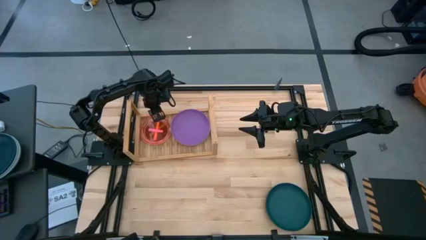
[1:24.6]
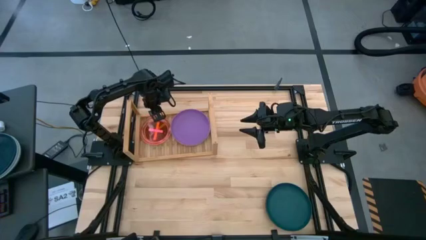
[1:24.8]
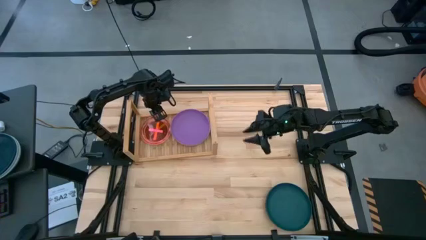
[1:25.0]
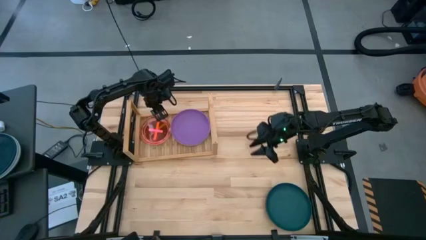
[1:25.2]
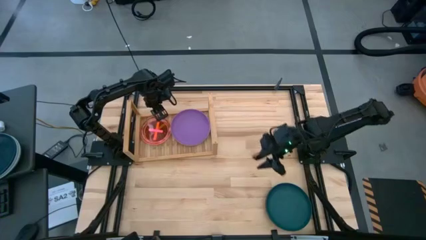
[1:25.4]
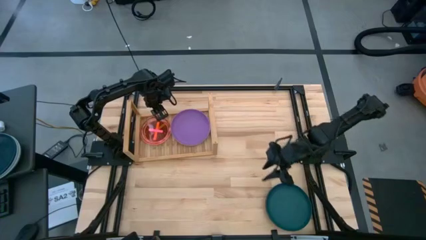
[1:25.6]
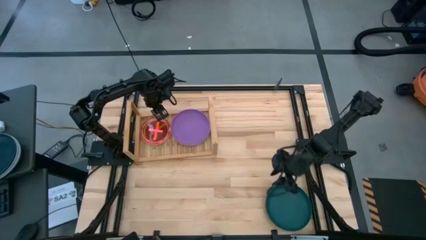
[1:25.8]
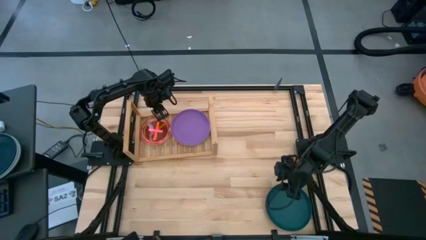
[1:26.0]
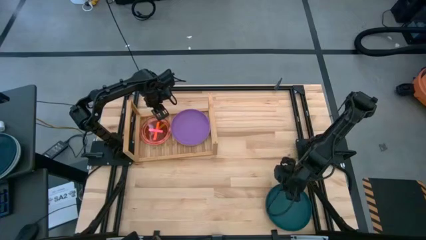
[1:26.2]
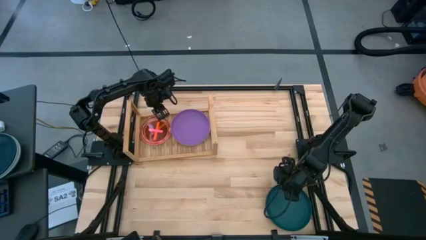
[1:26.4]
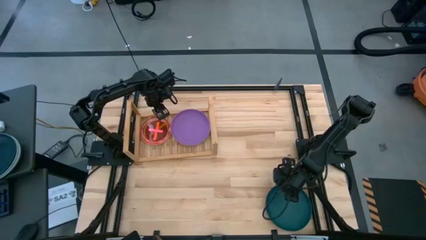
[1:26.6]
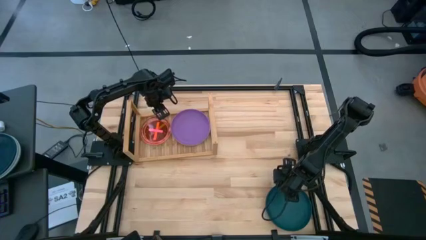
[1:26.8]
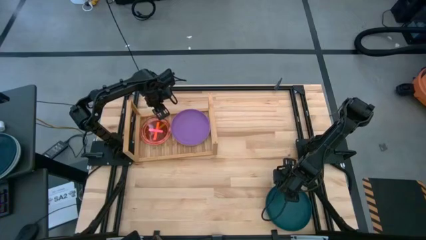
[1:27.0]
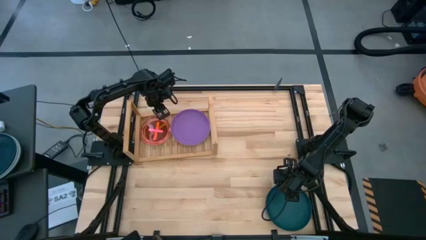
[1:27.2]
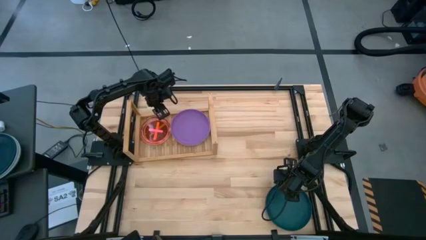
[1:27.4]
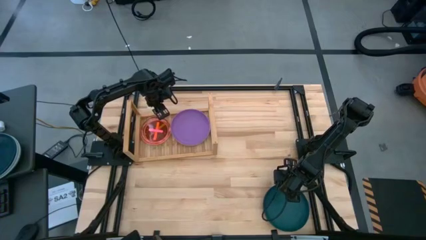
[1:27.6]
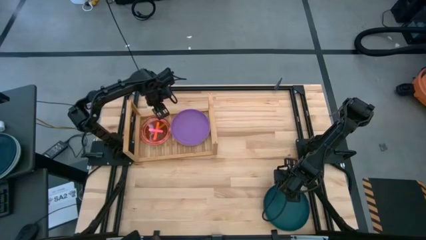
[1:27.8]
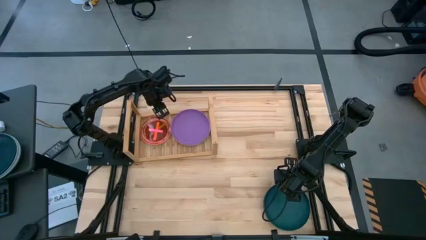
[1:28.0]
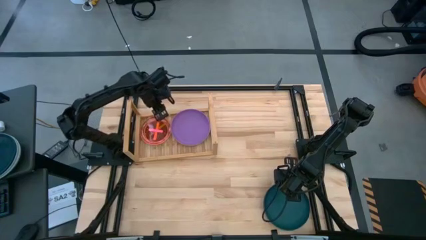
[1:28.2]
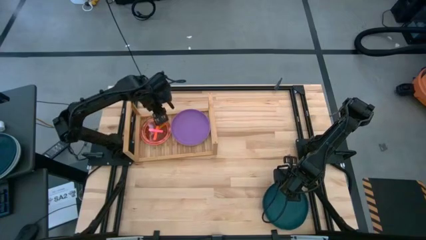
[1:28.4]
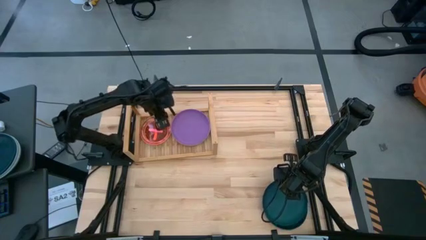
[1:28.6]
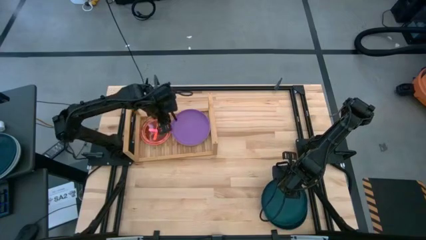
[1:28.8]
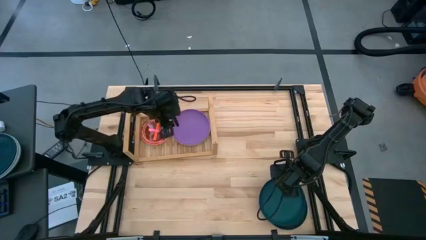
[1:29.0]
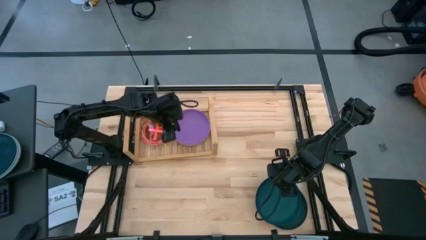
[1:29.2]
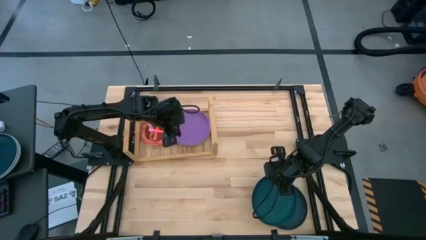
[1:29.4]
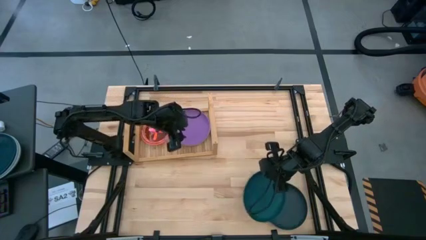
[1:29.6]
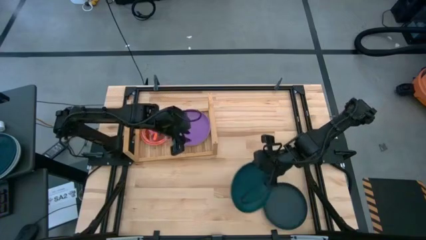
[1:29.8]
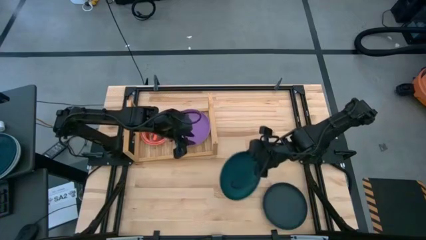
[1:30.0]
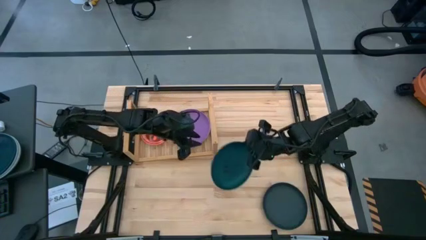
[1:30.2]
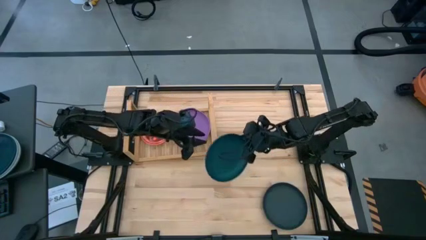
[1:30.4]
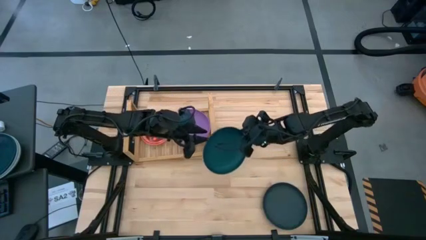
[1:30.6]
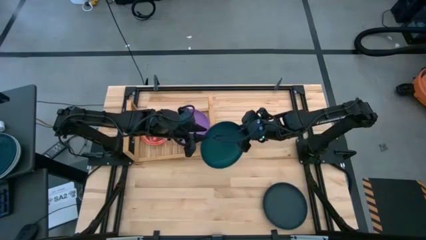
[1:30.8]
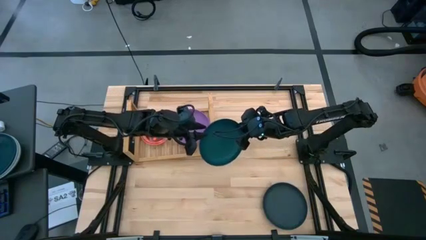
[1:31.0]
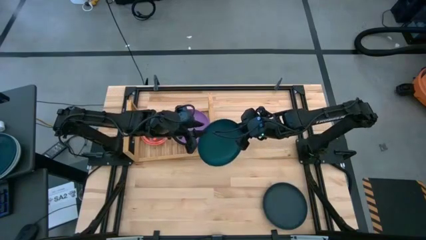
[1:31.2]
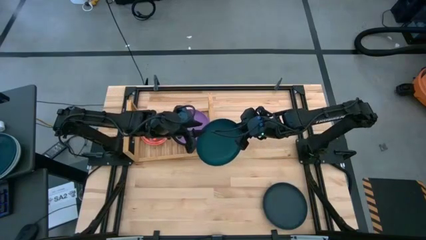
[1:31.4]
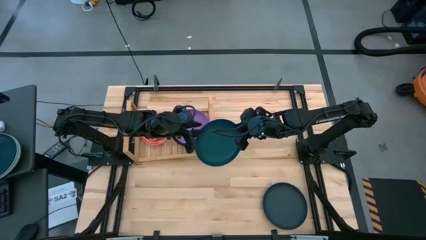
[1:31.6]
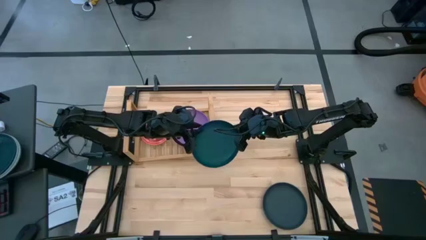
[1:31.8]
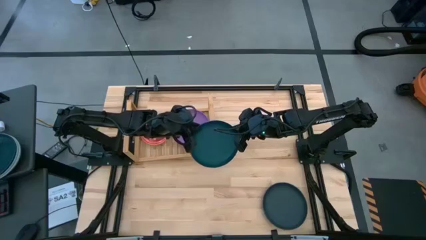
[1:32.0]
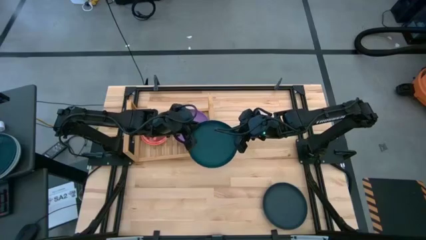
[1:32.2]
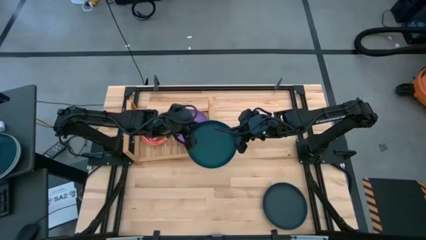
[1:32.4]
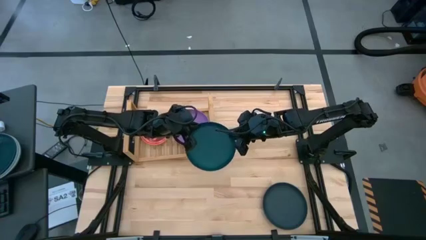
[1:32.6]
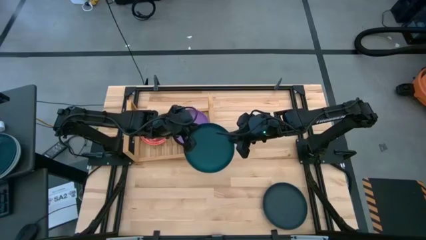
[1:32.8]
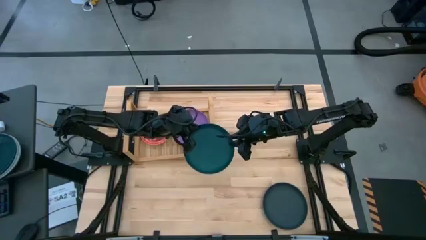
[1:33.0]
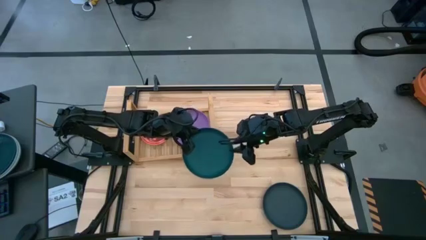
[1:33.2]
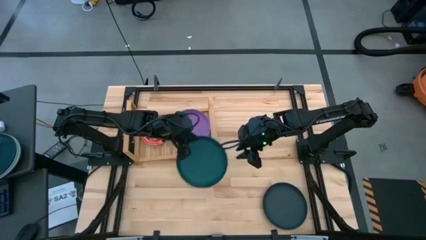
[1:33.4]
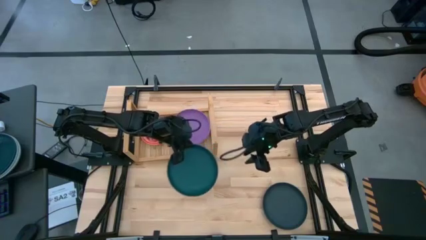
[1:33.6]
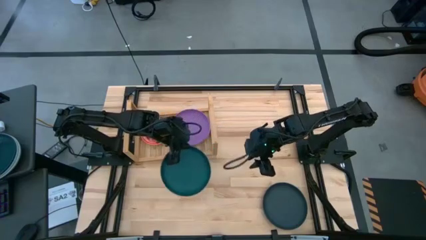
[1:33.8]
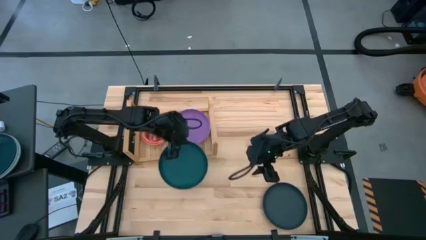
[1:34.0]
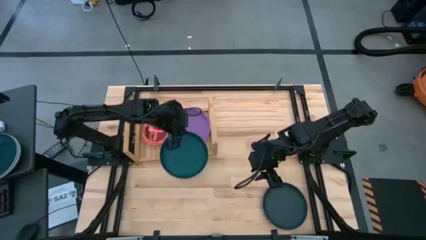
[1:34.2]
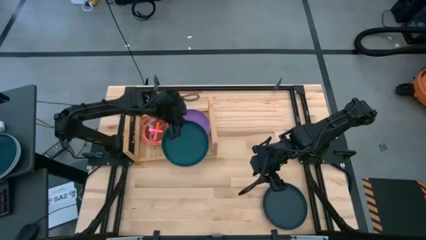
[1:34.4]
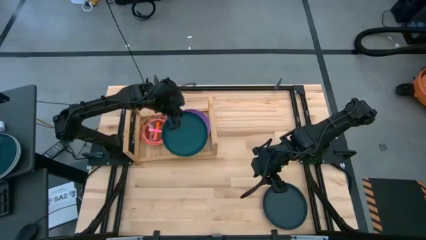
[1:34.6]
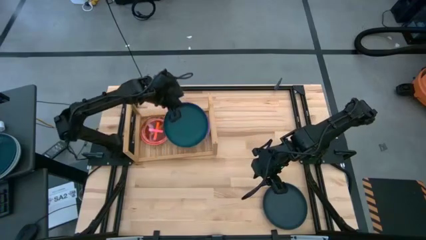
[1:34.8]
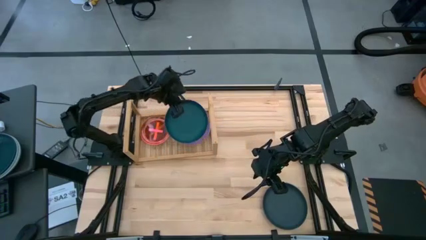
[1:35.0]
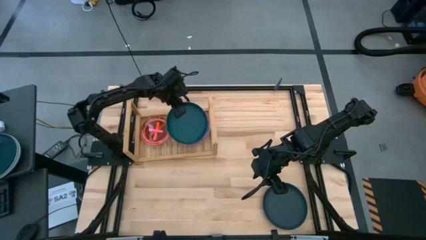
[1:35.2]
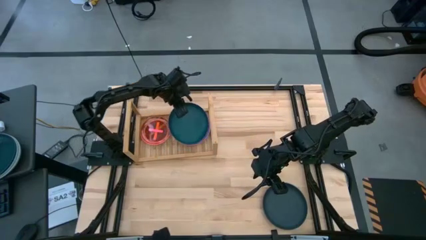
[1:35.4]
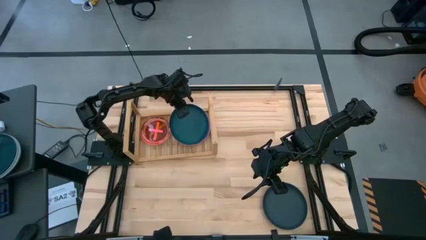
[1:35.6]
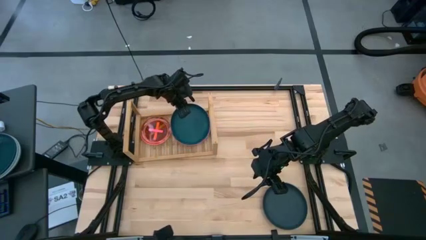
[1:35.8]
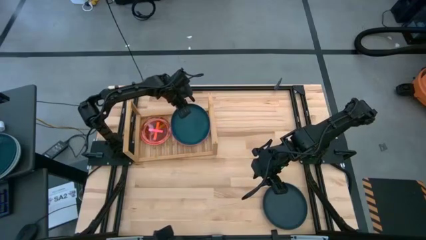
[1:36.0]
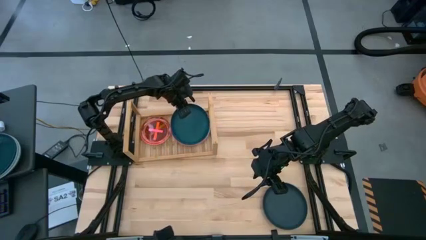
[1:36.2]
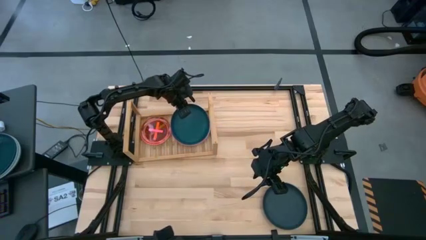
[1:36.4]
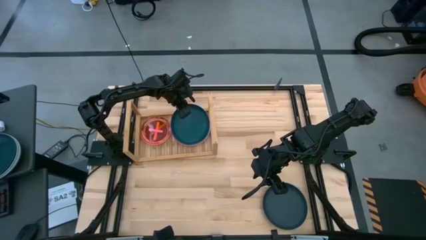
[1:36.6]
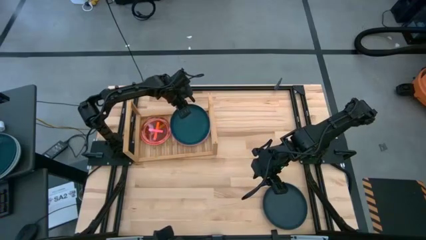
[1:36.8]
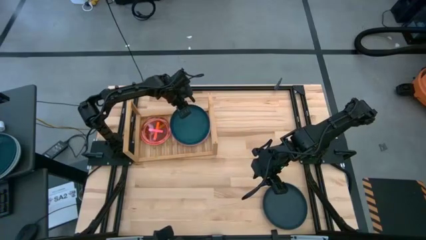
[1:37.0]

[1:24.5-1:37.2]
Task: Place and stack plates onto a shelf
Stack the green plate on top of the purple plate on the shelf
